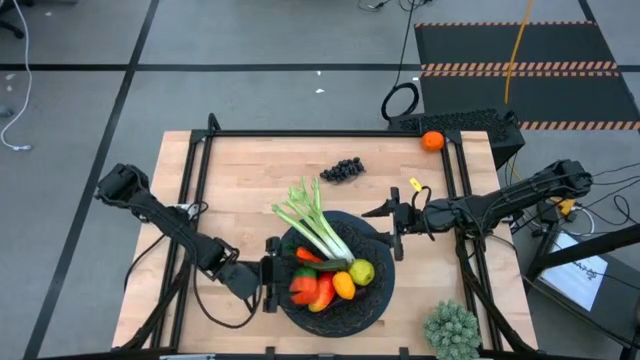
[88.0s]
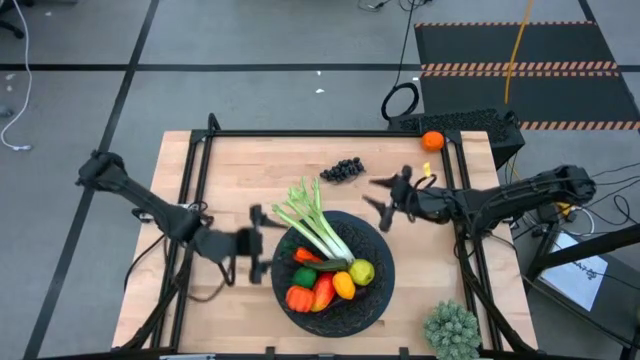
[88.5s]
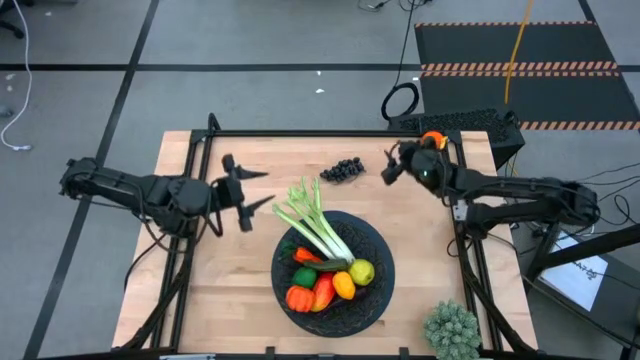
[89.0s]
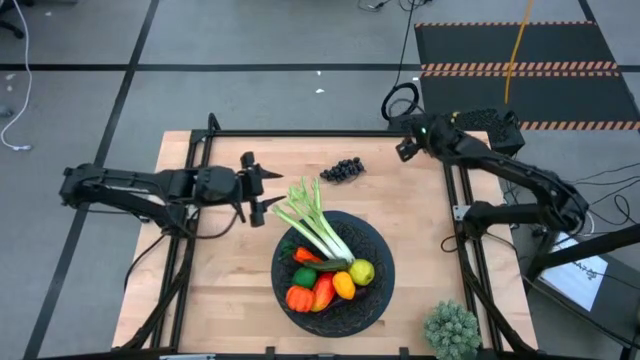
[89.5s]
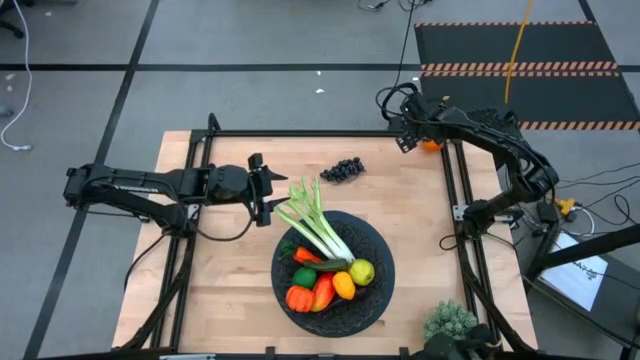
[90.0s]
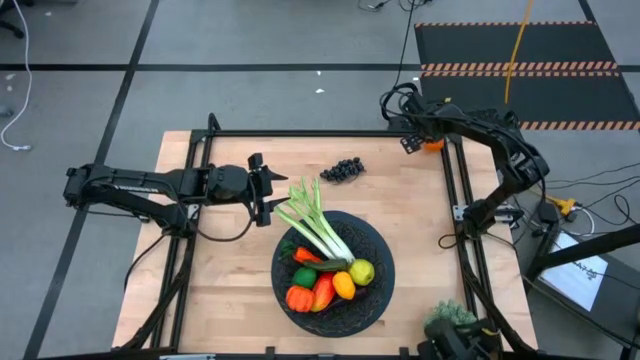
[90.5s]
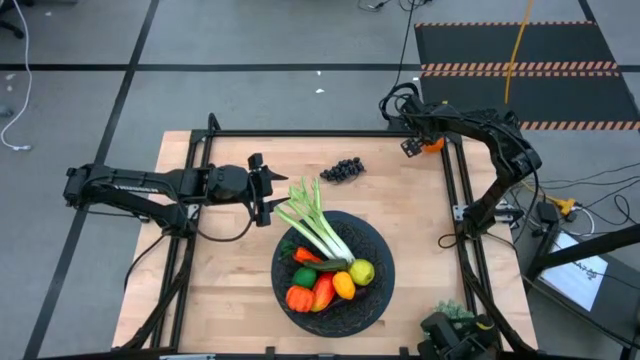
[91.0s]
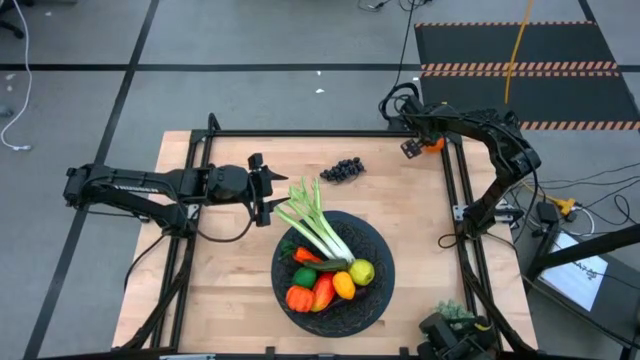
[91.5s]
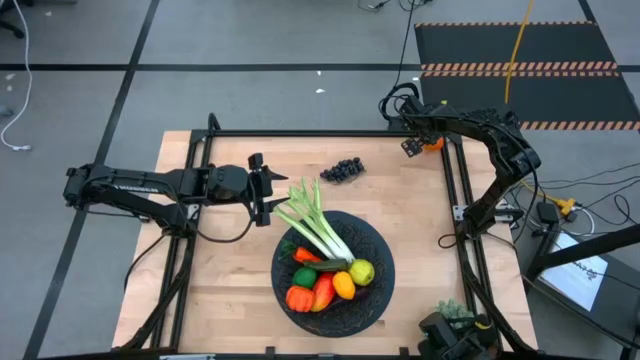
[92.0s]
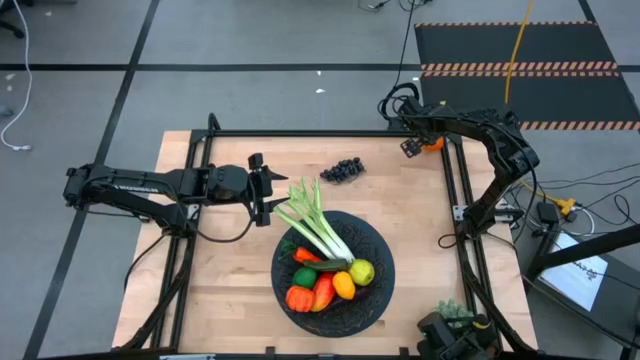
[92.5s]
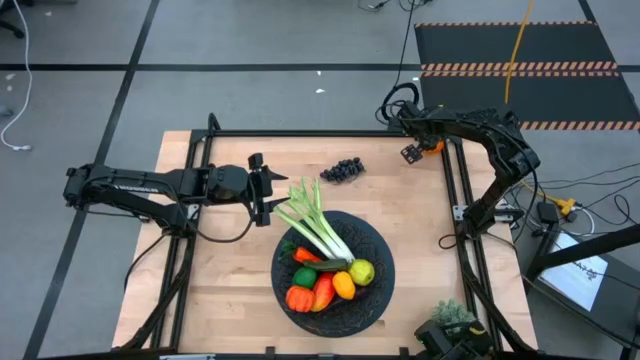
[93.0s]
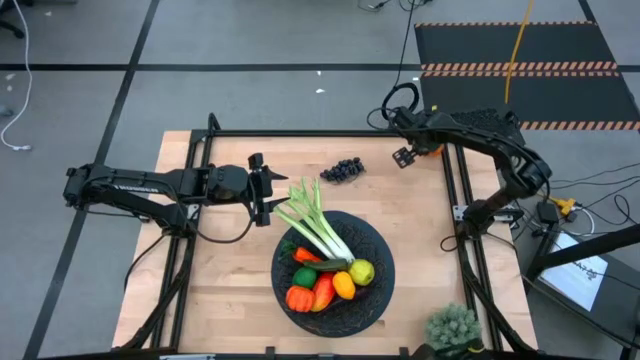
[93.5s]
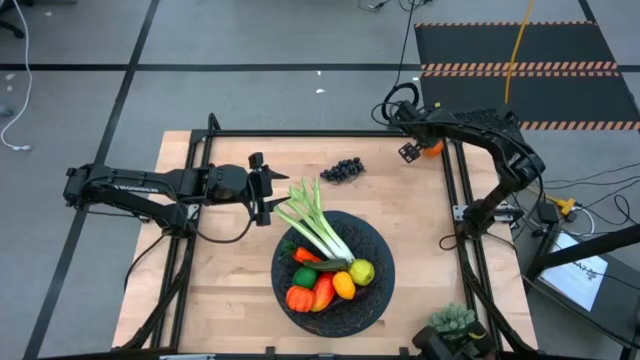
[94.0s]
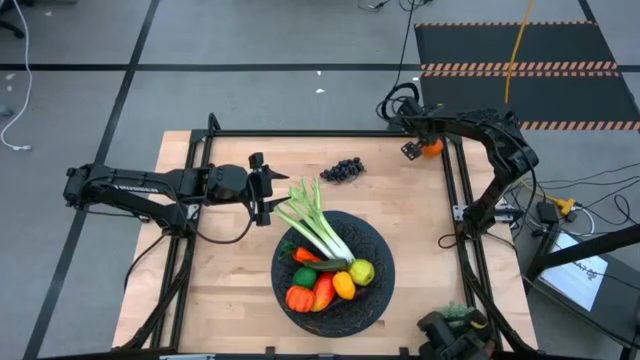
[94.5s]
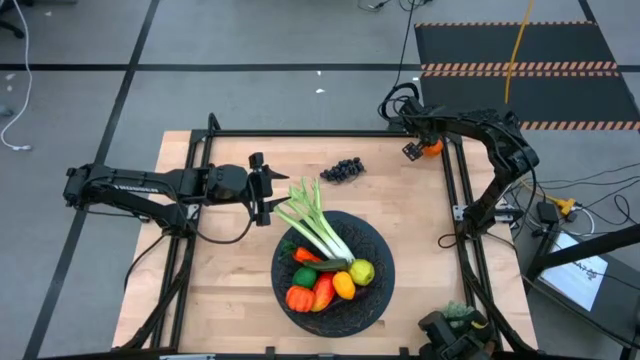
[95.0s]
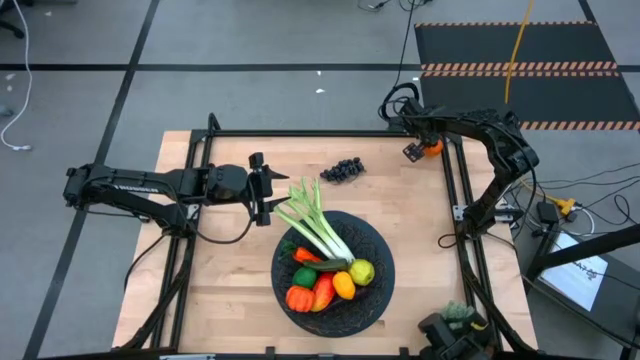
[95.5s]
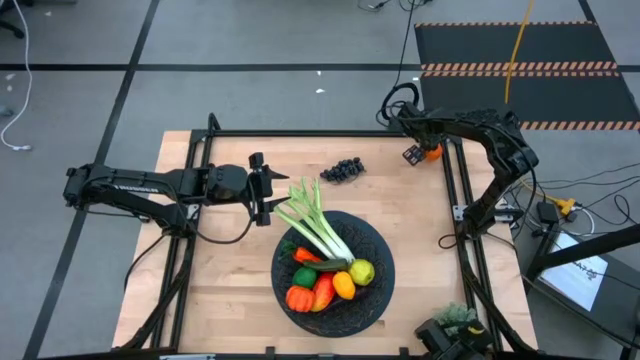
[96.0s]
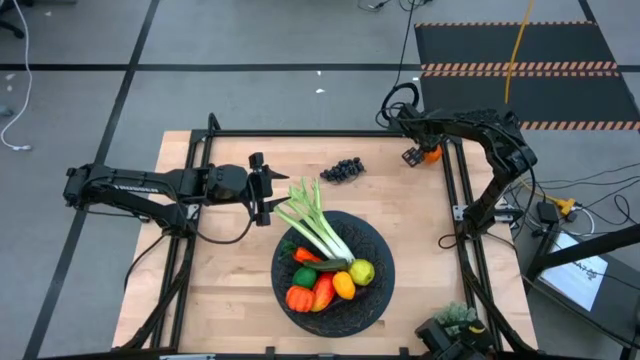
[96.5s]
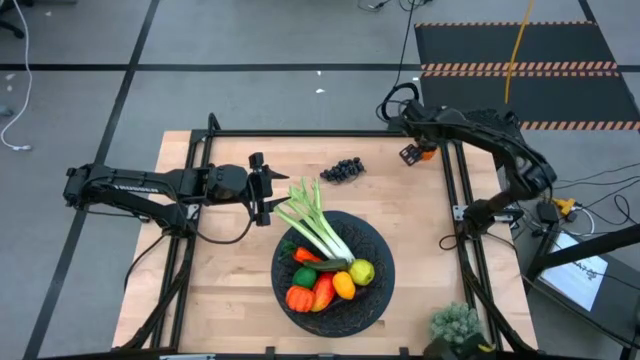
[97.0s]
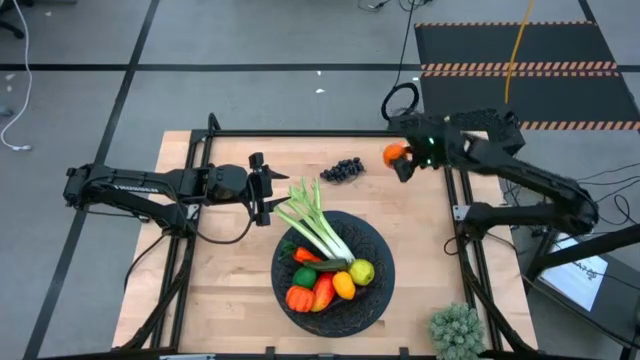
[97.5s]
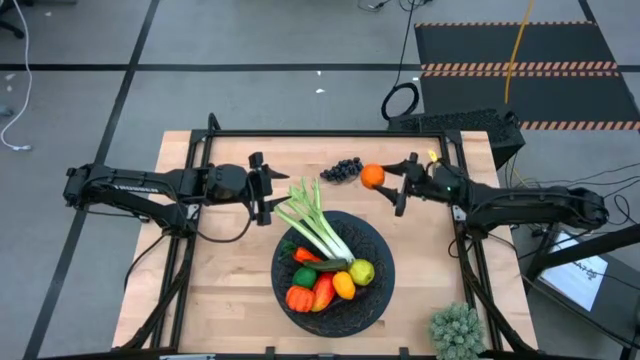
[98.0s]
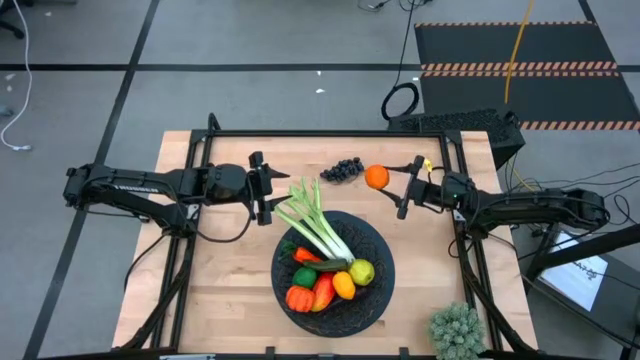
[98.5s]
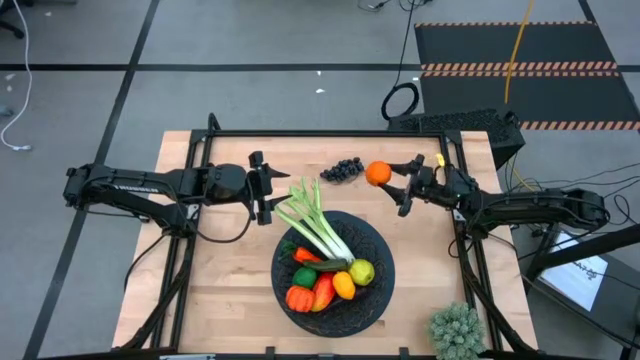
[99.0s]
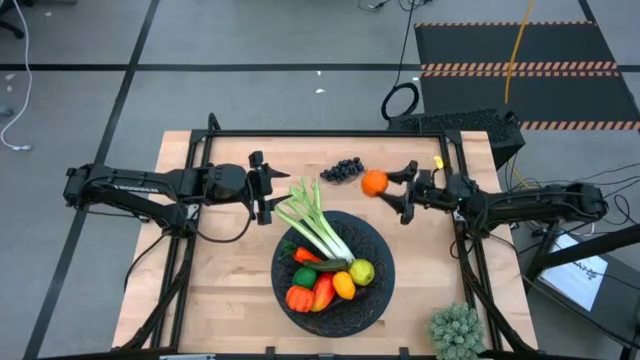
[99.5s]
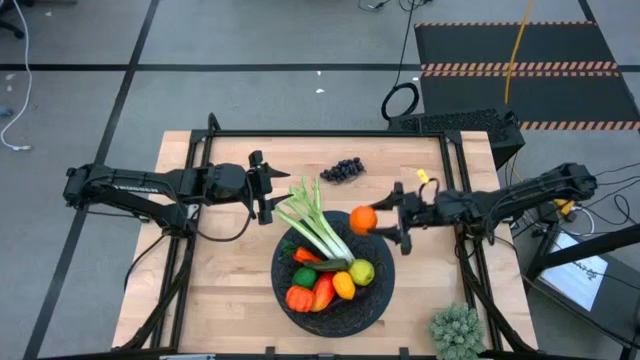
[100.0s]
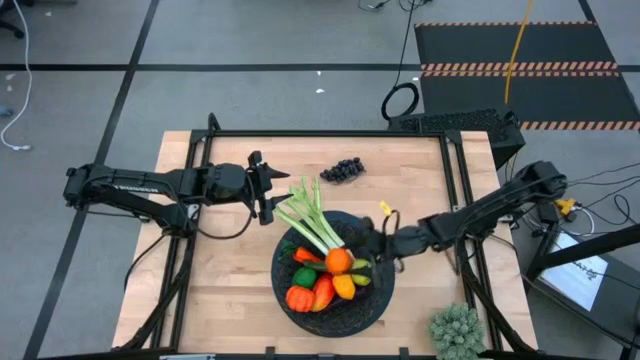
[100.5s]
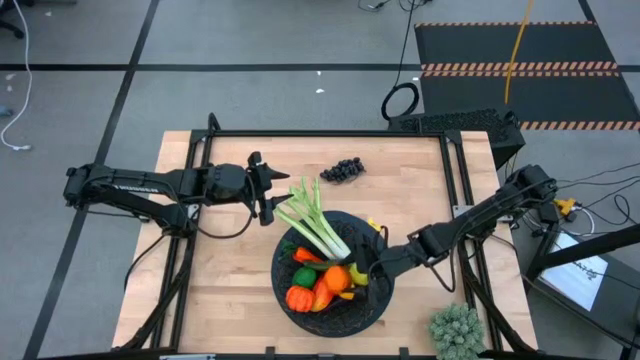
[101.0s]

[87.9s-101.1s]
Task: Build produce basket
Put the orange into the black mesh basket

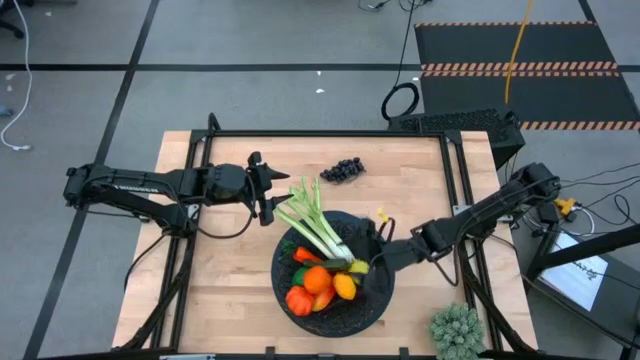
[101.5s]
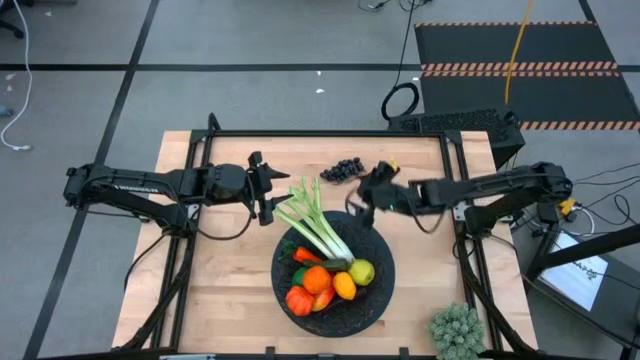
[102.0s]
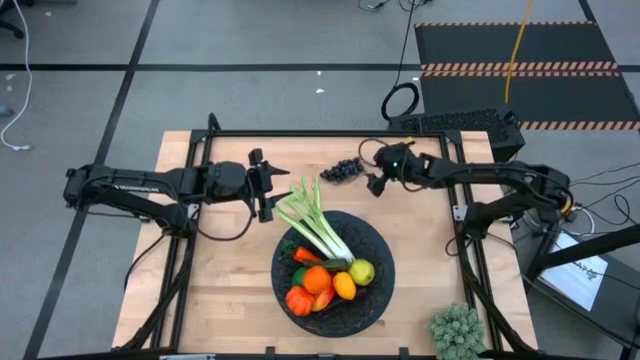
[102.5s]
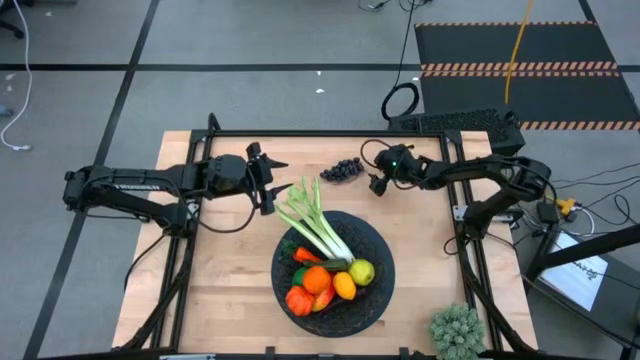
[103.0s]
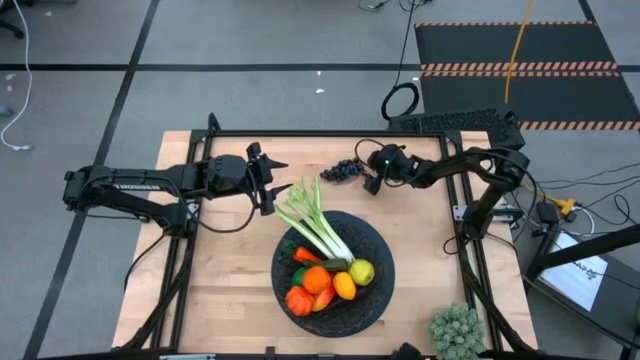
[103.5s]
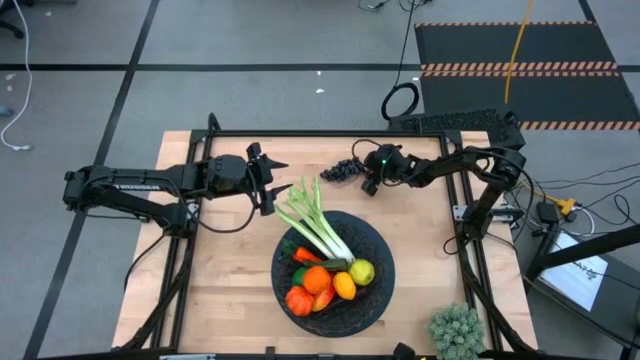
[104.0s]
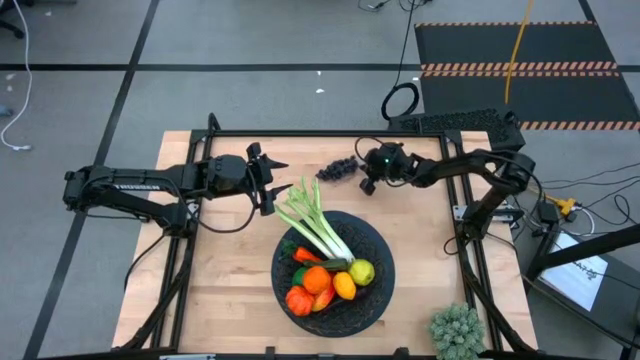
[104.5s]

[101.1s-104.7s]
Put the violet grapes into the black mesh basket

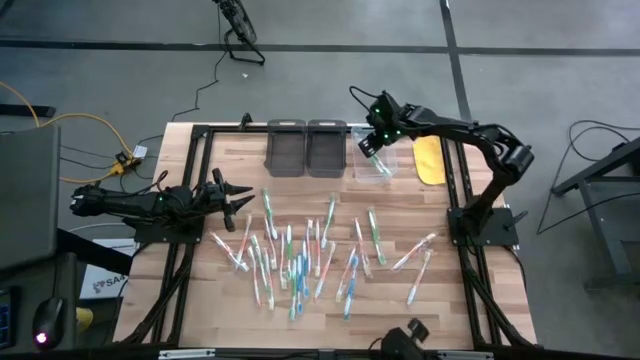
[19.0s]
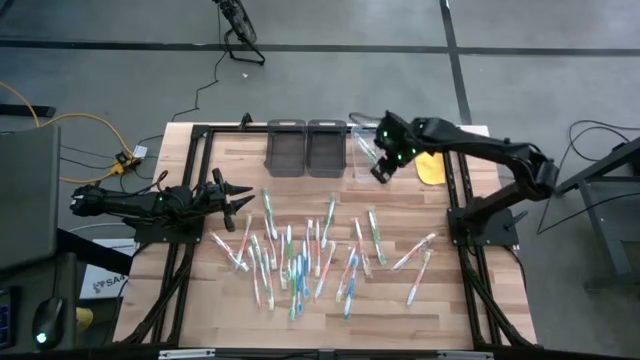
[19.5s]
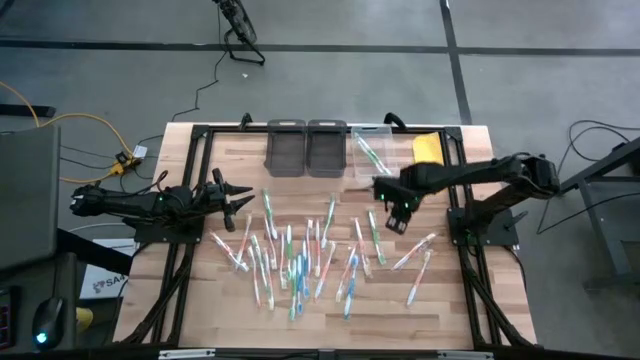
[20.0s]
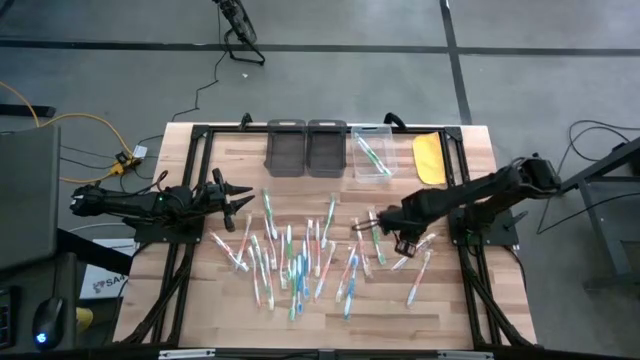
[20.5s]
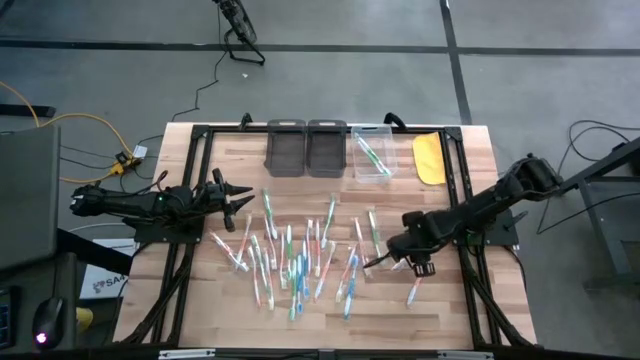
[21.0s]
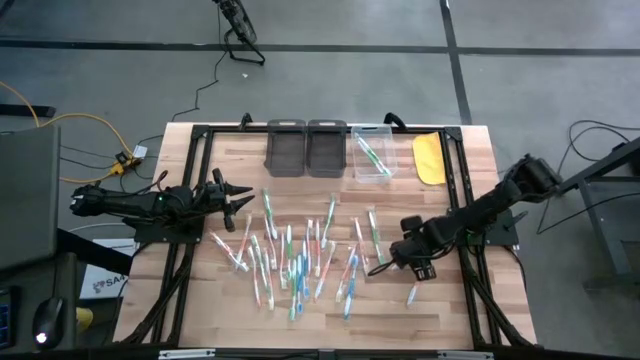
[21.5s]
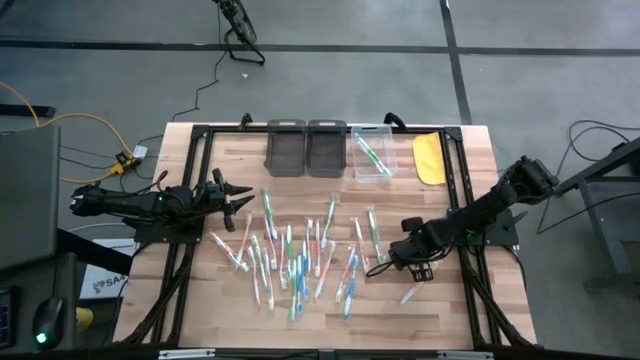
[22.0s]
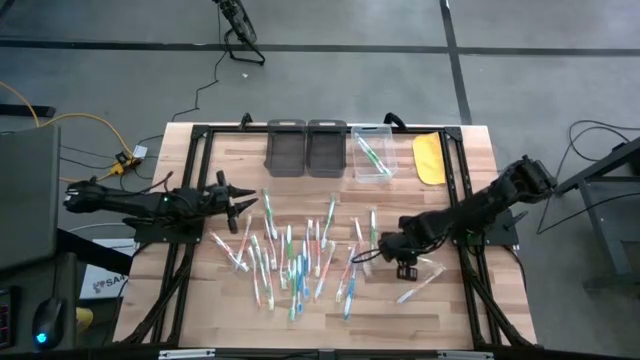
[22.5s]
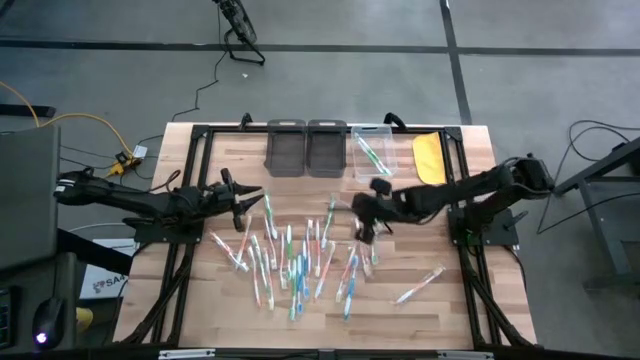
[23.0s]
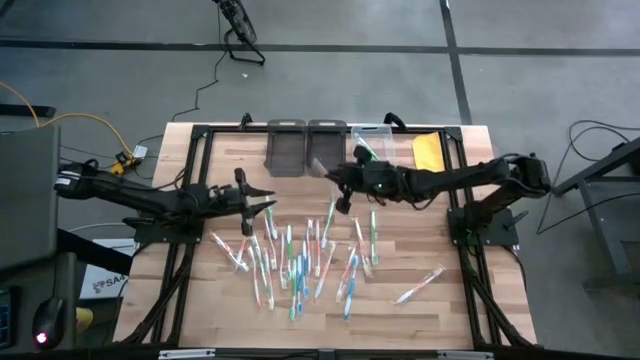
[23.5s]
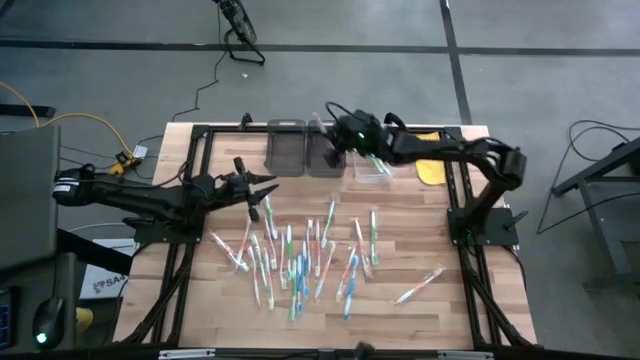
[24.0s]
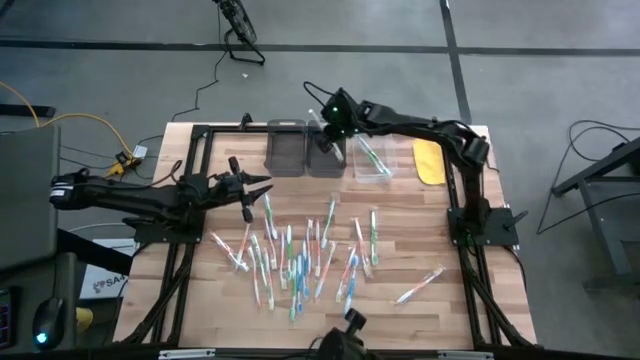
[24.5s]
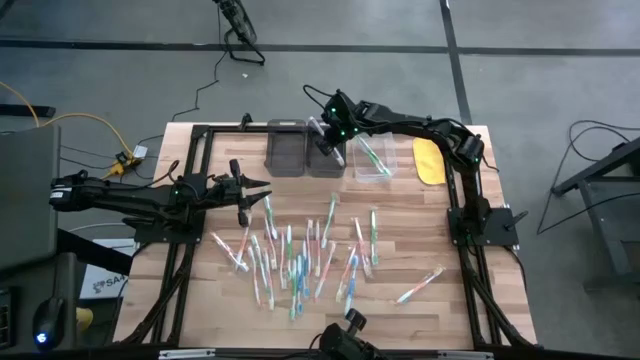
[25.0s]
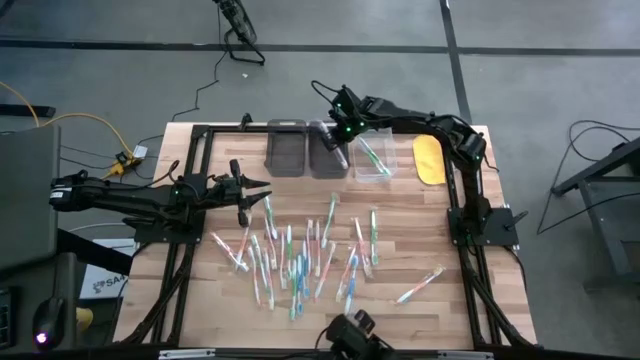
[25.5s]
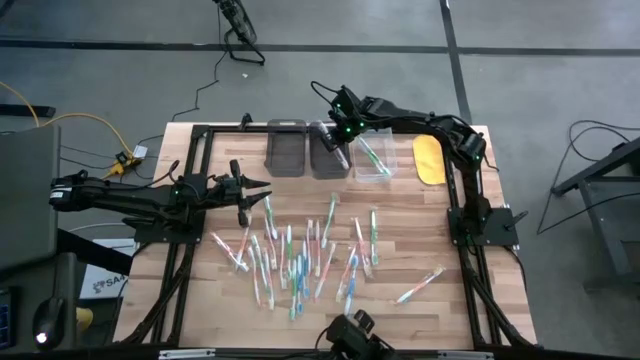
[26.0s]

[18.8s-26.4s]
Task: Pick & Place Toothbrushes
Put the orange toothbrush into the right black bin
